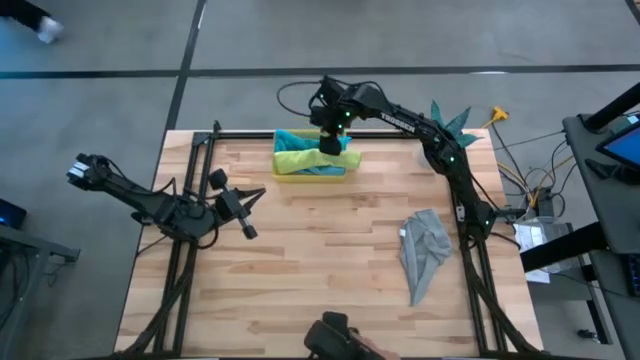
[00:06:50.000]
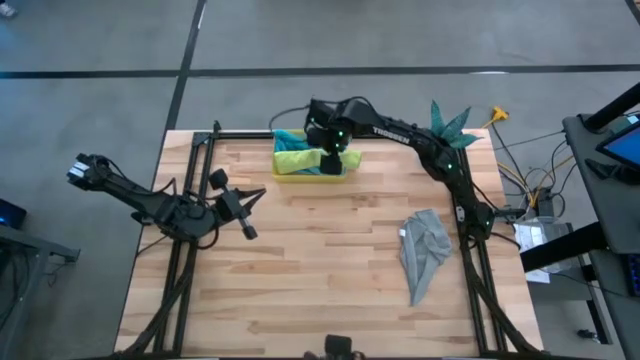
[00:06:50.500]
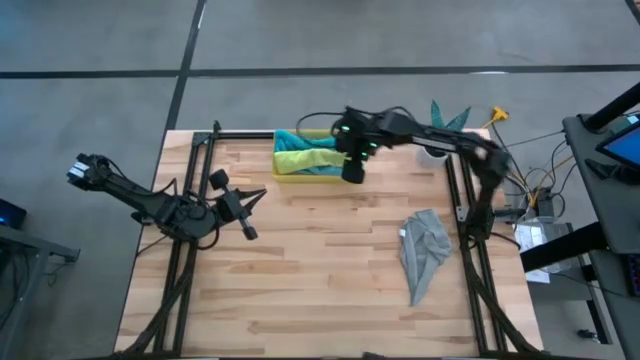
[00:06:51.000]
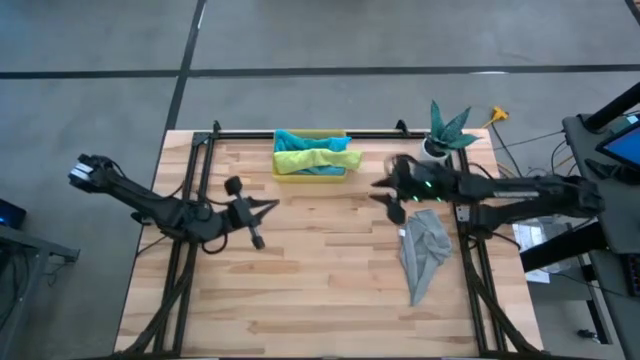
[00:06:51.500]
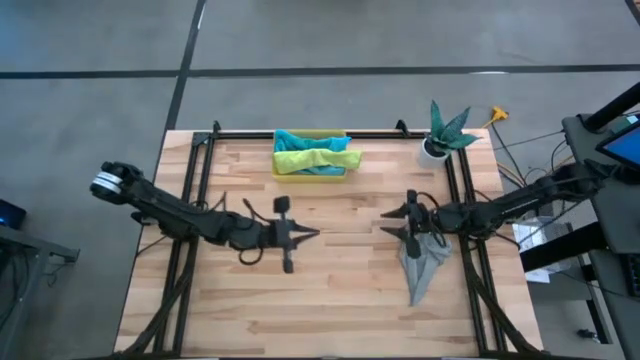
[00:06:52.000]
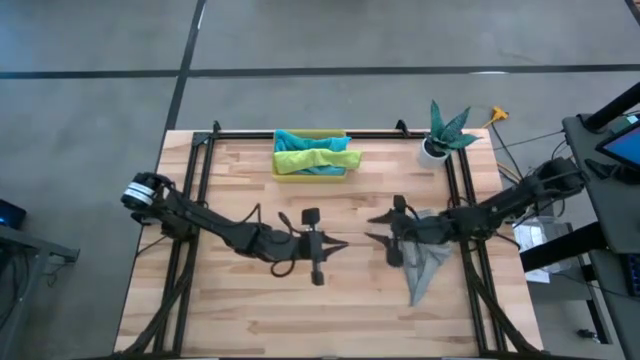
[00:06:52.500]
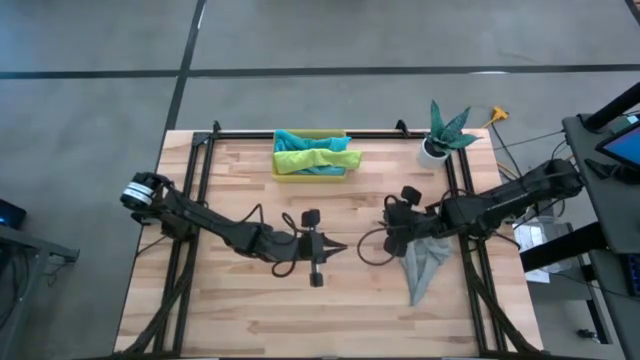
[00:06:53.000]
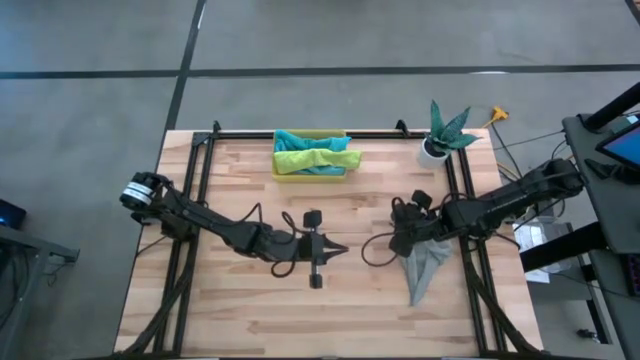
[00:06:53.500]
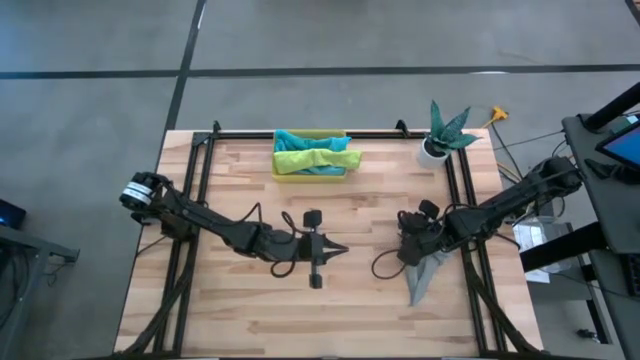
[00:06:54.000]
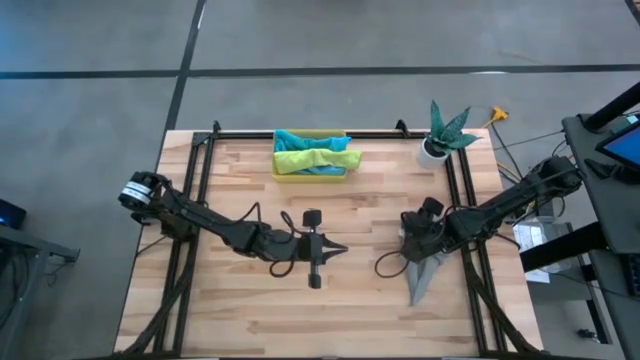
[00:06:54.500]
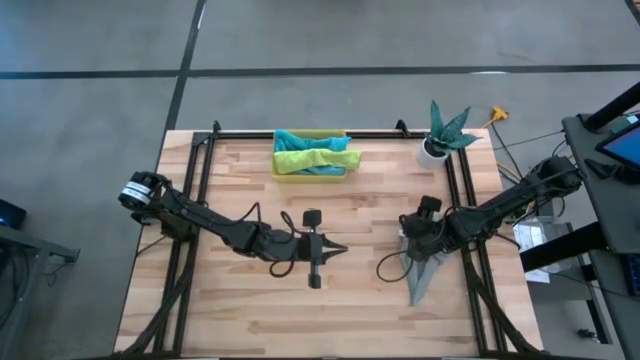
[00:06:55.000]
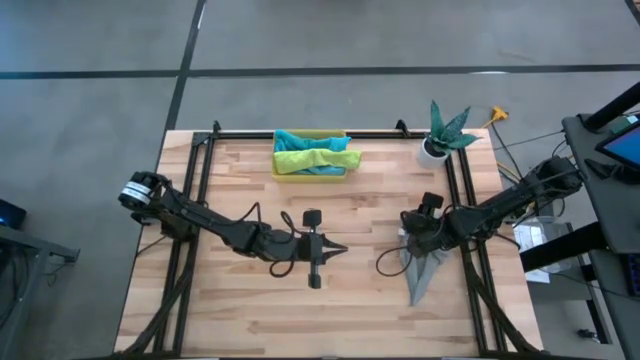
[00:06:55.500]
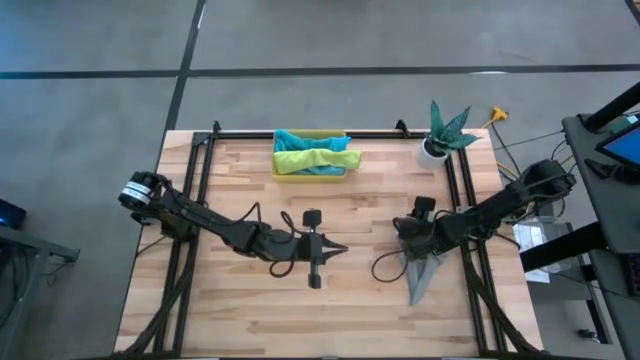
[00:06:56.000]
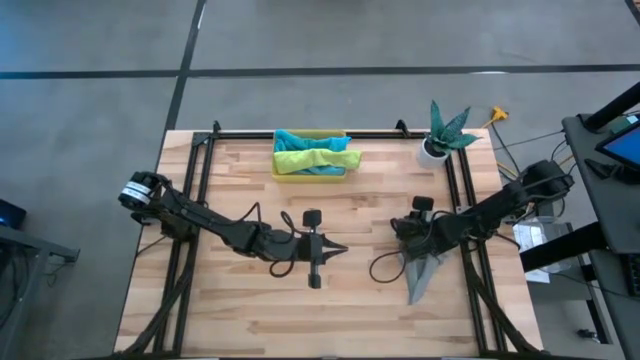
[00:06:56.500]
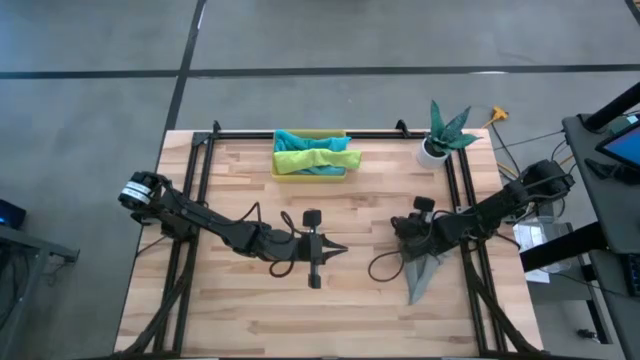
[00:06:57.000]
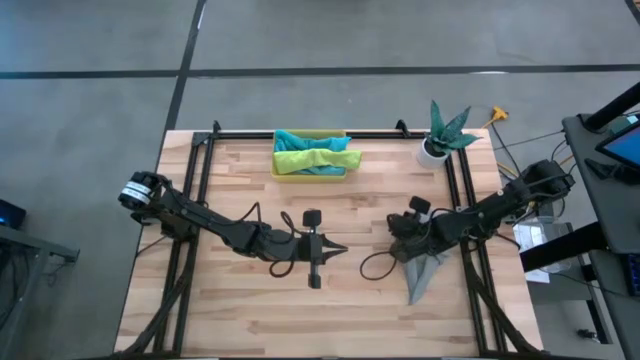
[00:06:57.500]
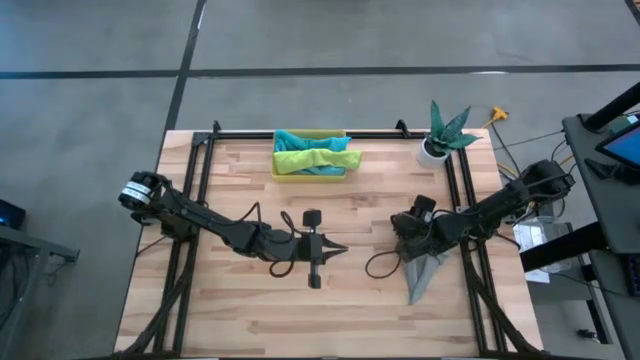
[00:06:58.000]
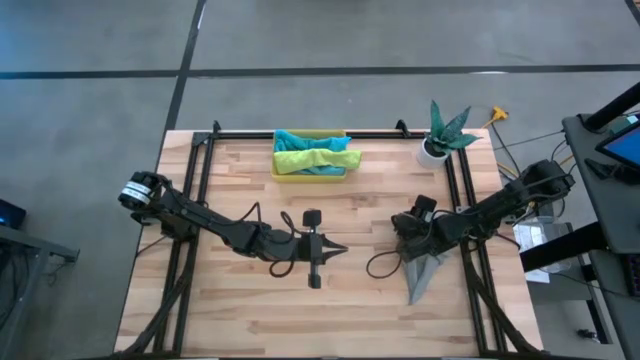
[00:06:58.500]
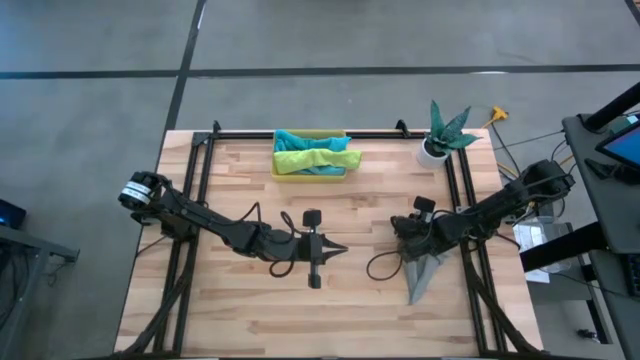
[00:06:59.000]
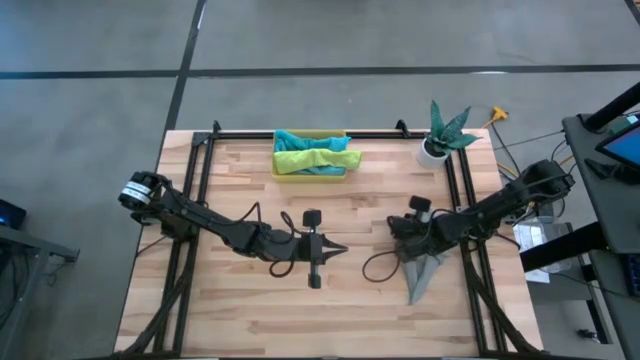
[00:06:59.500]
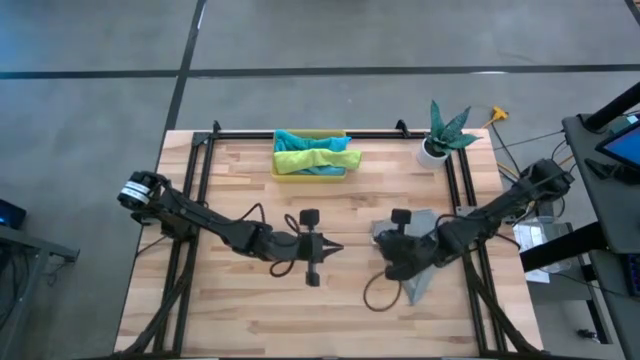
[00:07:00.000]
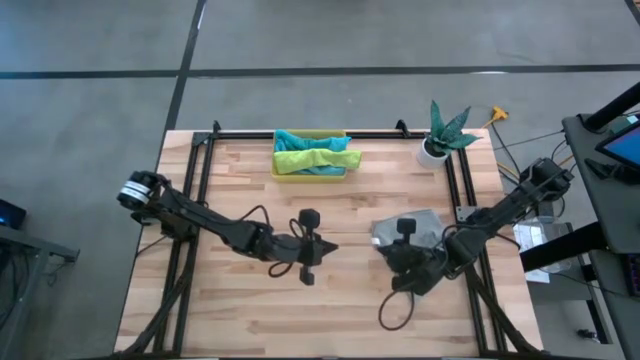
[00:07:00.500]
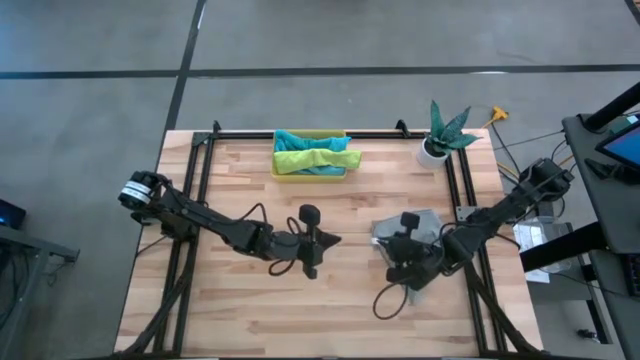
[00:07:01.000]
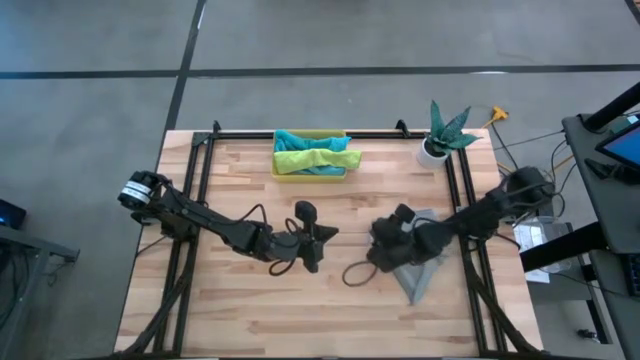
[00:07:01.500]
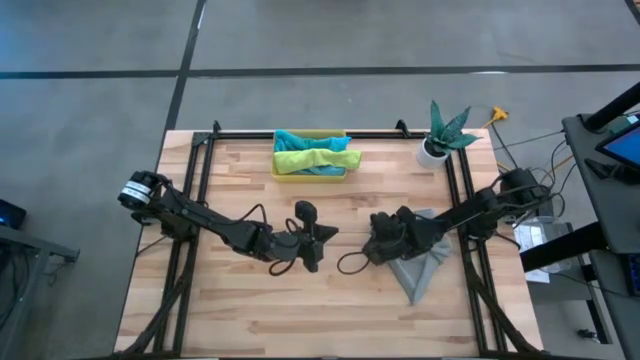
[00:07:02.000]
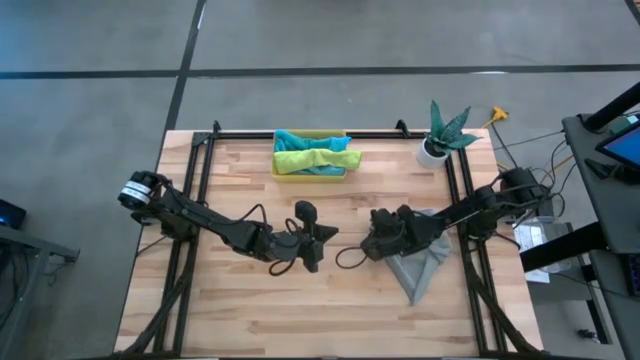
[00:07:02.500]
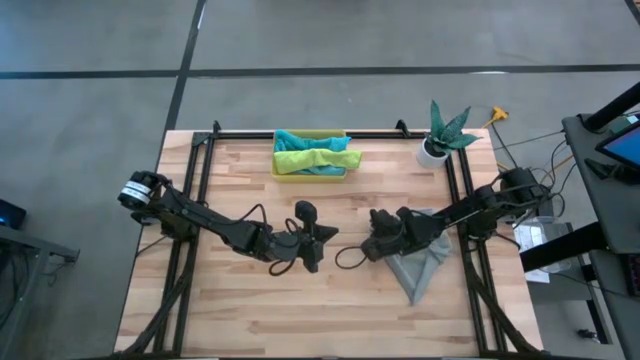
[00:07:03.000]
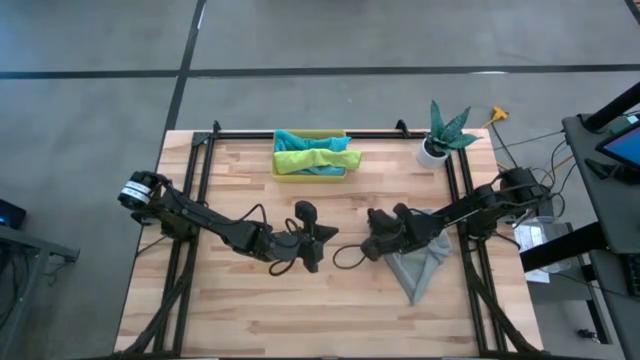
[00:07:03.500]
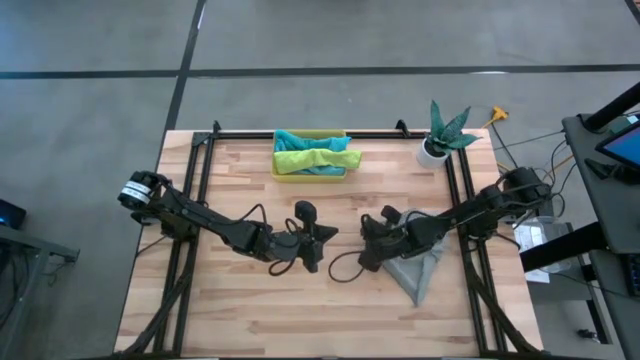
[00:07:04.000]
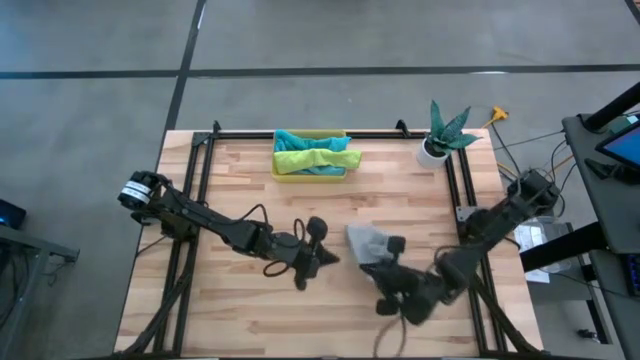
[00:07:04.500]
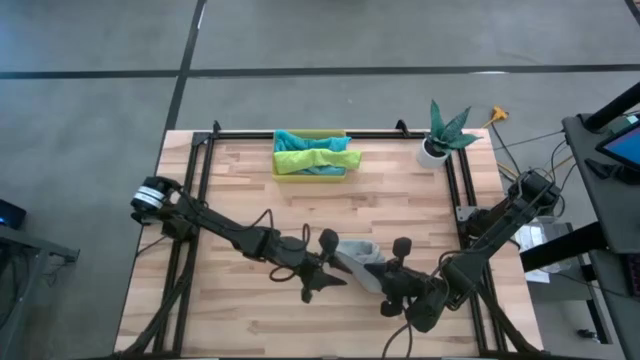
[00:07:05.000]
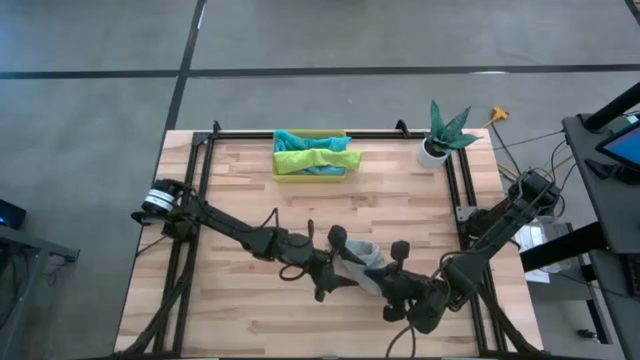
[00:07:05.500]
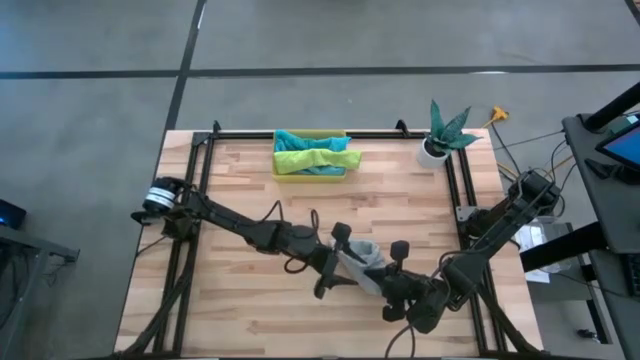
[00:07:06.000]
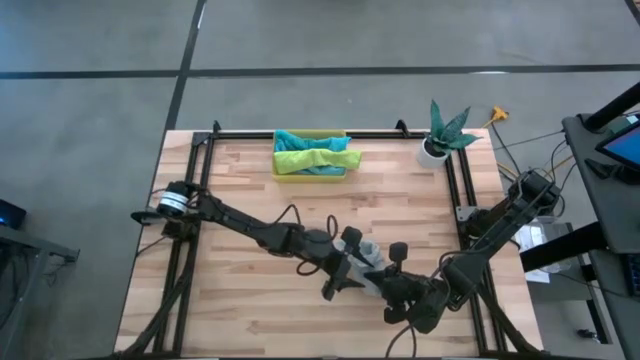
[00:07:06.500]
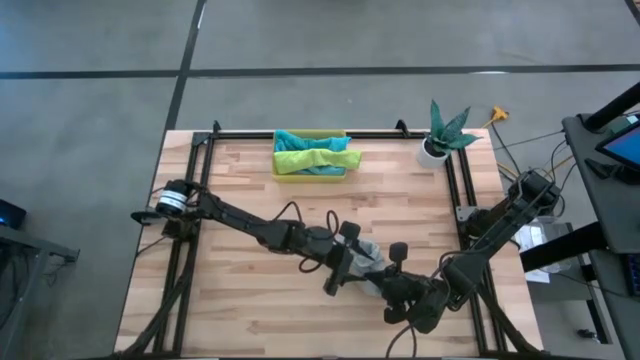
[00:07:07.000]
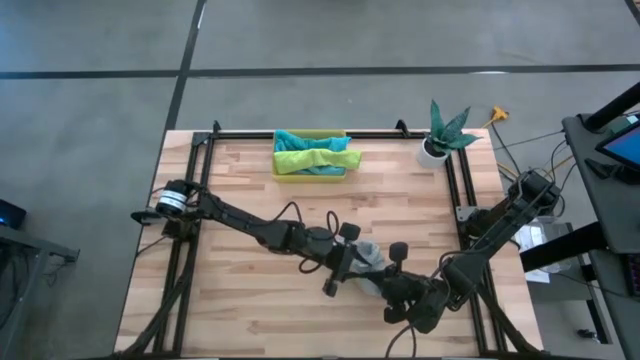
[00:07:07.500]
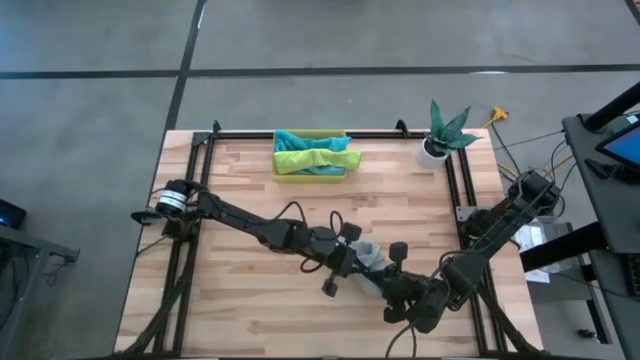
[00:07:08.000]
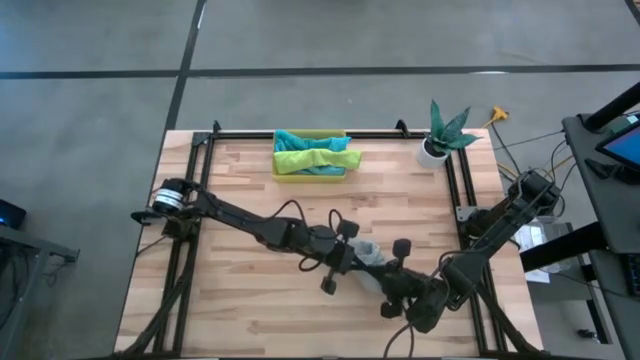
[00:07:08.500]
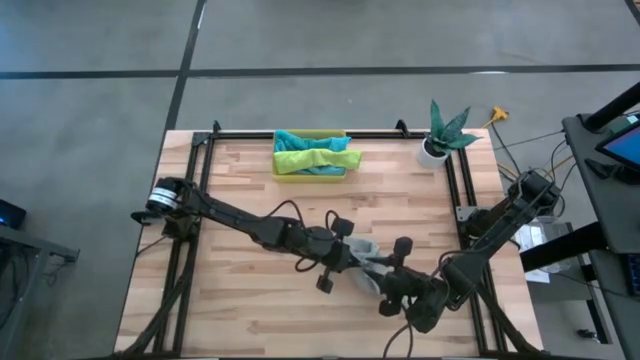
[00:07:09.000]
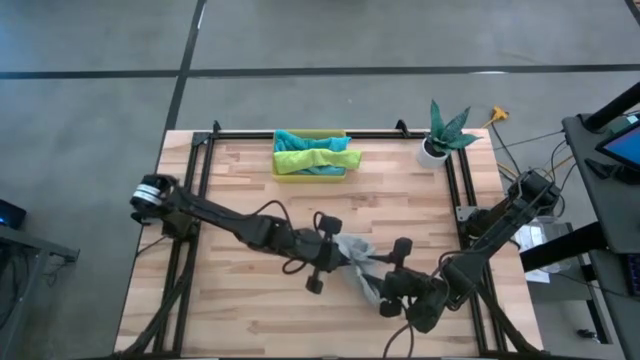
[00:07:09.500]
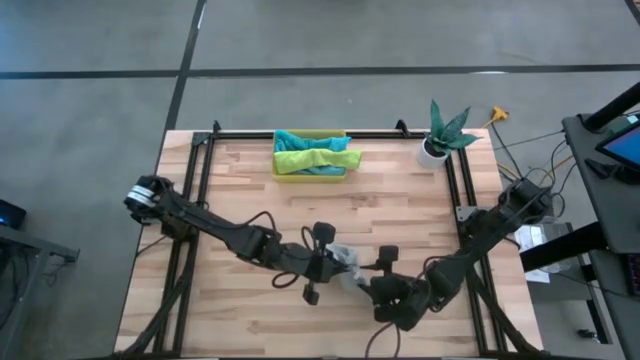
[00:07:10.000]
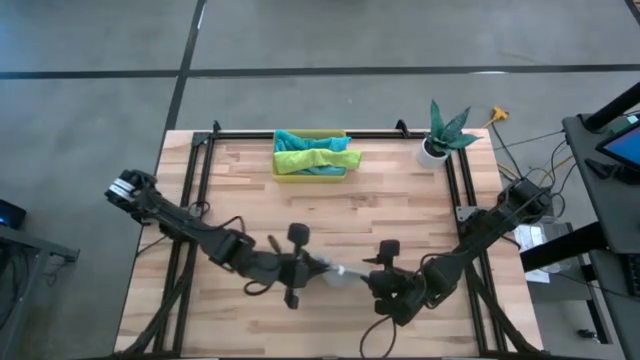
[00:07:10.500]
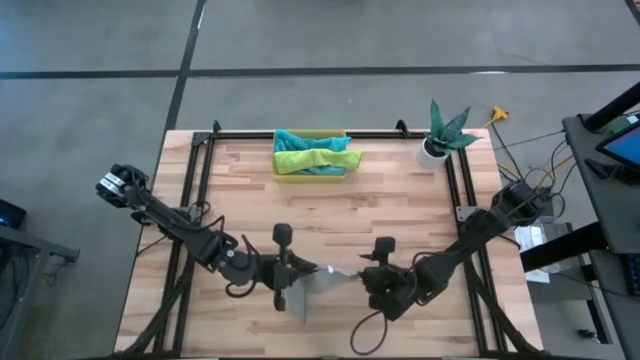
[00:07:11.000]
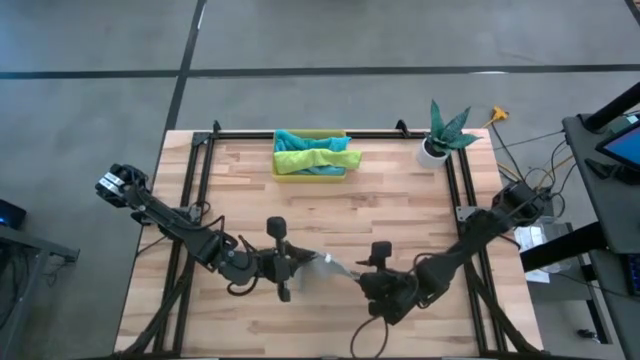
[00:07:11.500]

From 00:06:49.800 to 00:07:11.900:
Task: Roll microfiber towels into tight, uniform cylinder then place into a basket
Roll the gray towel
